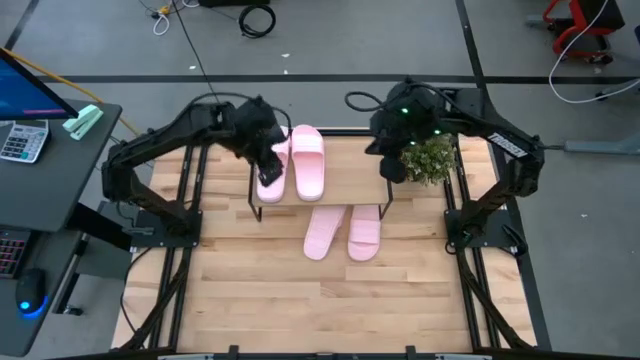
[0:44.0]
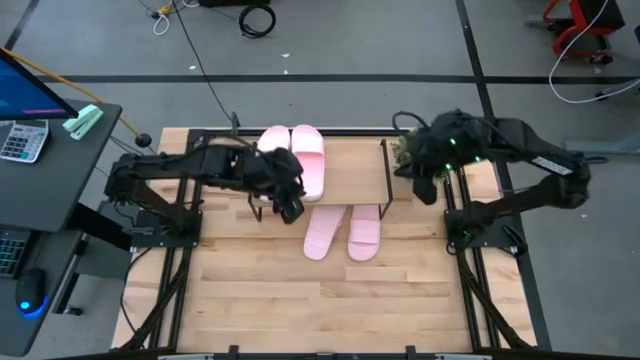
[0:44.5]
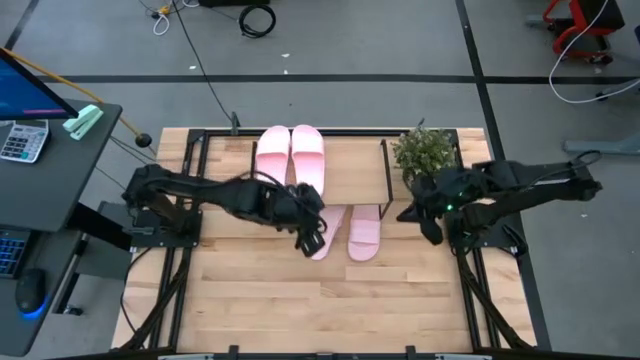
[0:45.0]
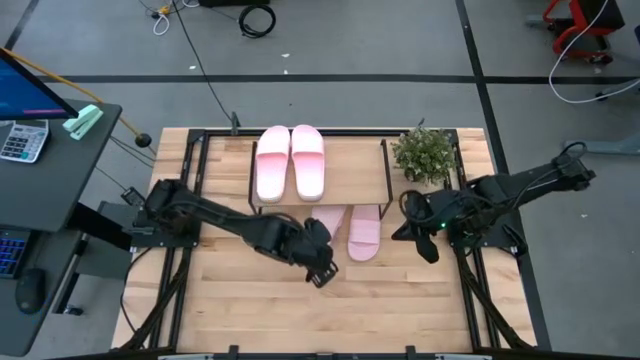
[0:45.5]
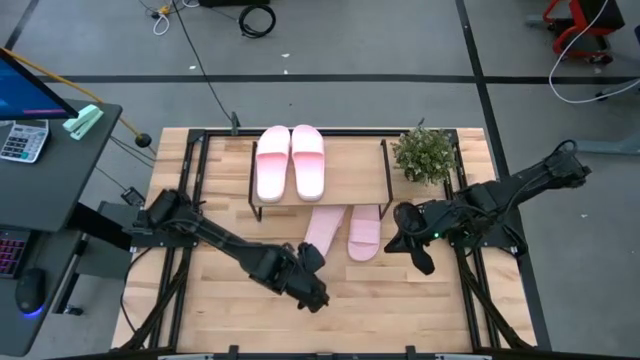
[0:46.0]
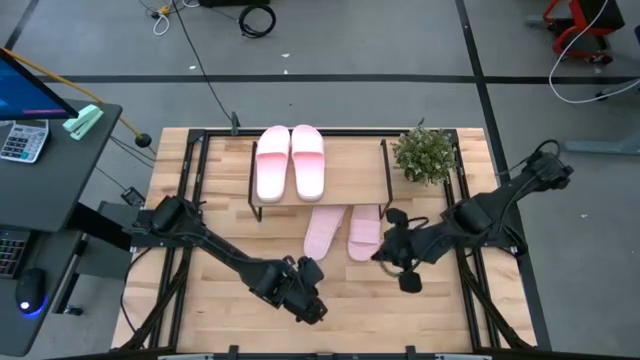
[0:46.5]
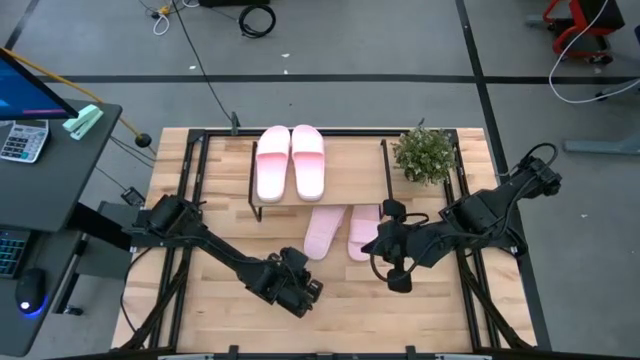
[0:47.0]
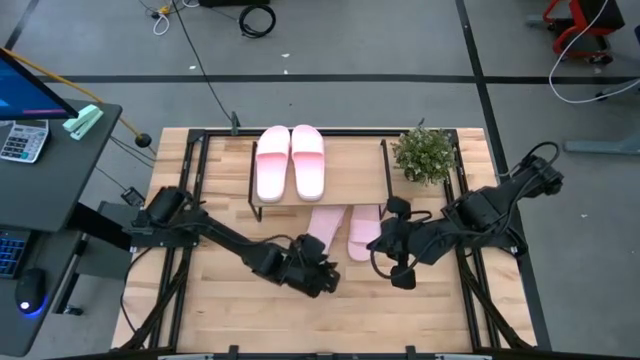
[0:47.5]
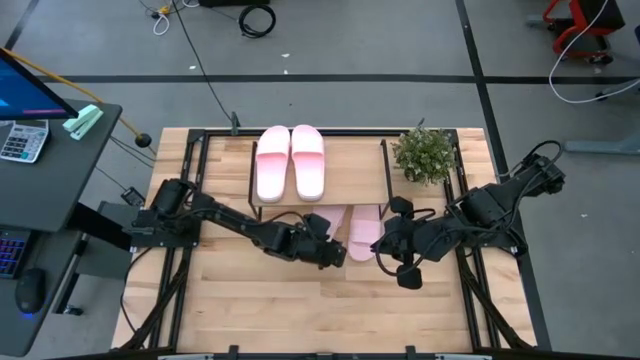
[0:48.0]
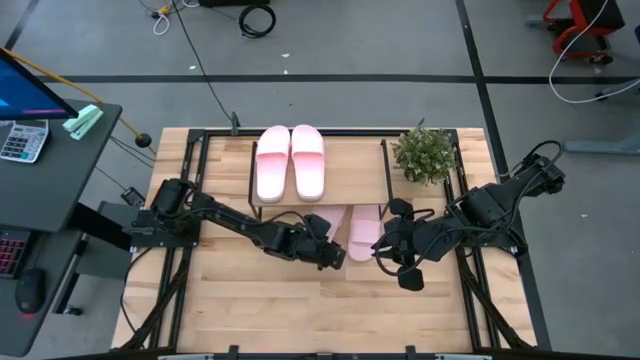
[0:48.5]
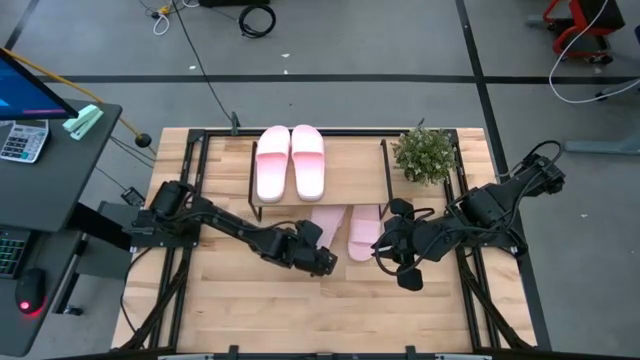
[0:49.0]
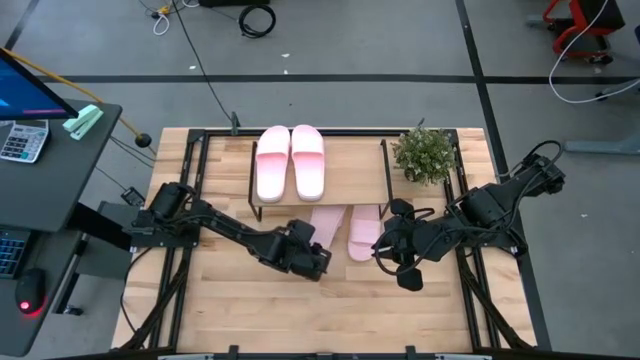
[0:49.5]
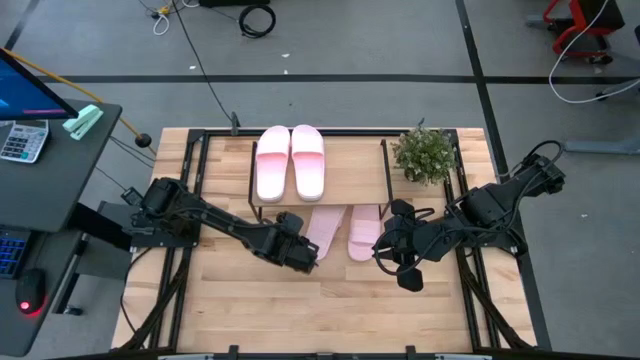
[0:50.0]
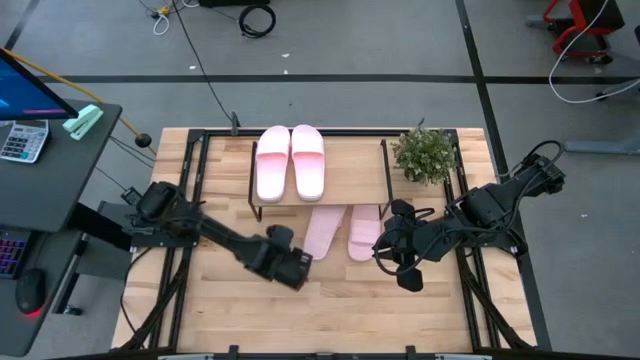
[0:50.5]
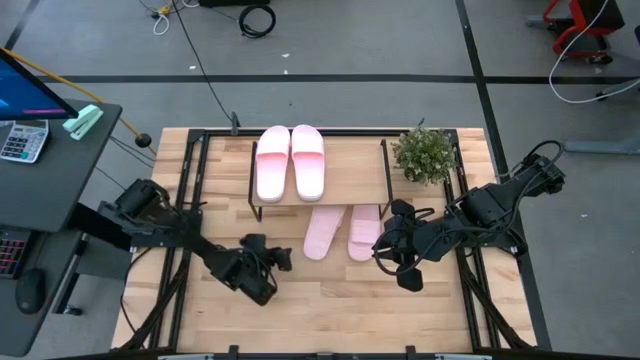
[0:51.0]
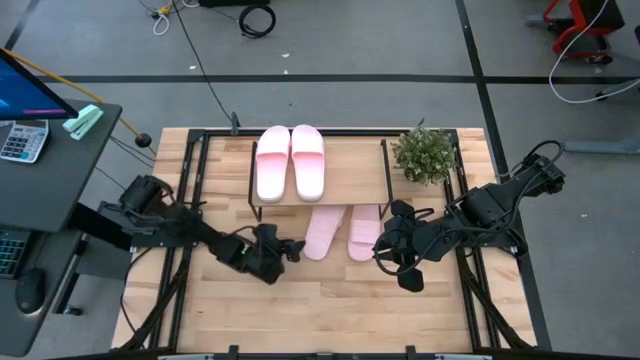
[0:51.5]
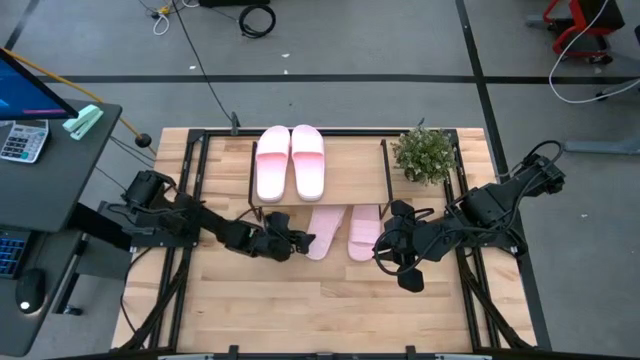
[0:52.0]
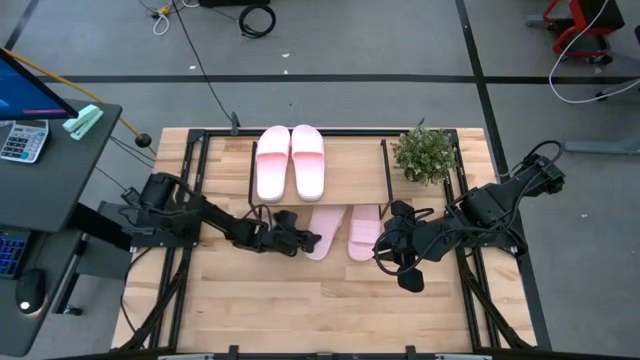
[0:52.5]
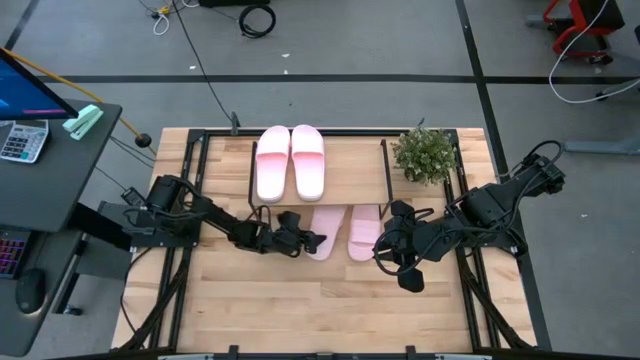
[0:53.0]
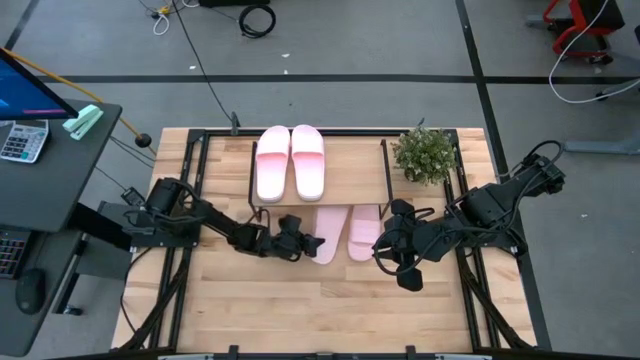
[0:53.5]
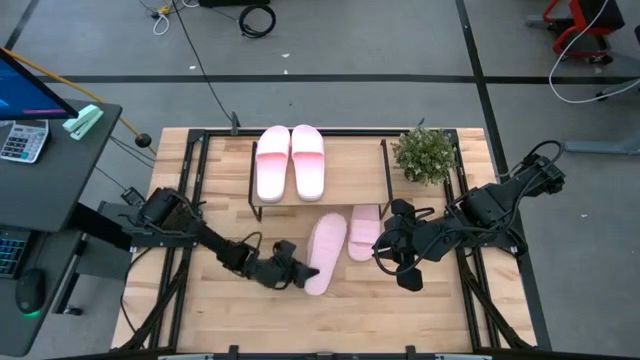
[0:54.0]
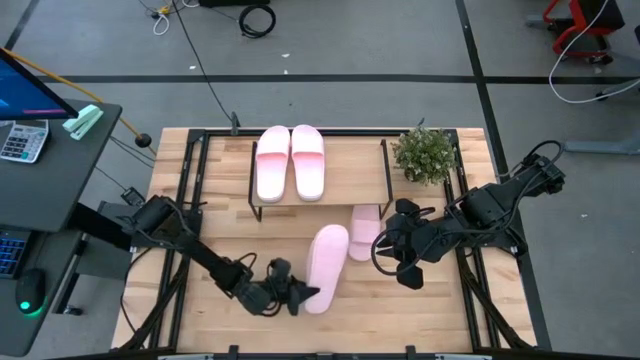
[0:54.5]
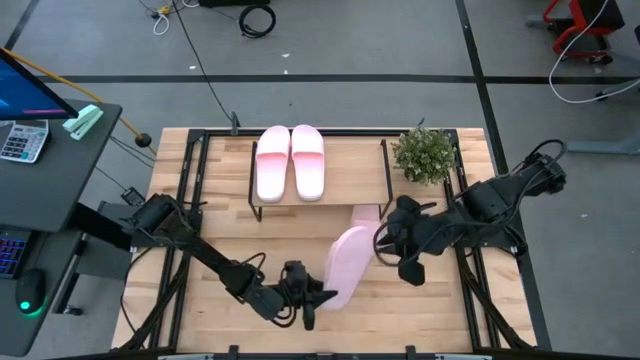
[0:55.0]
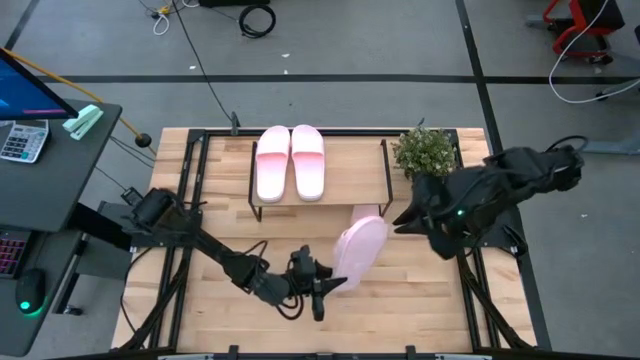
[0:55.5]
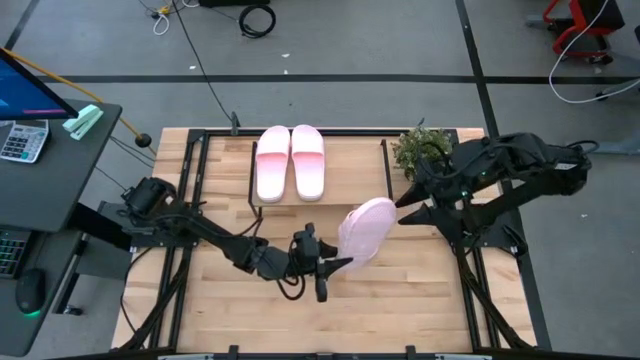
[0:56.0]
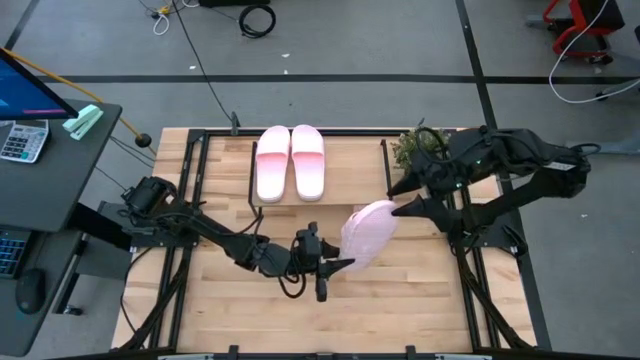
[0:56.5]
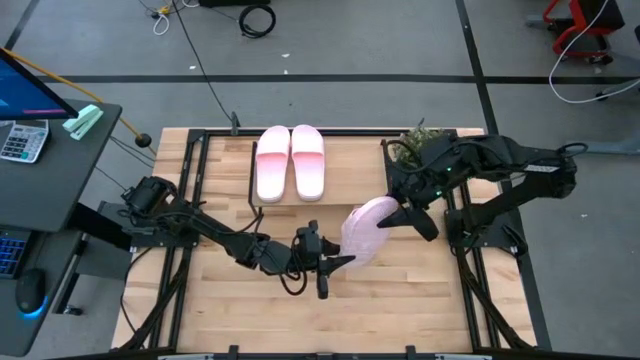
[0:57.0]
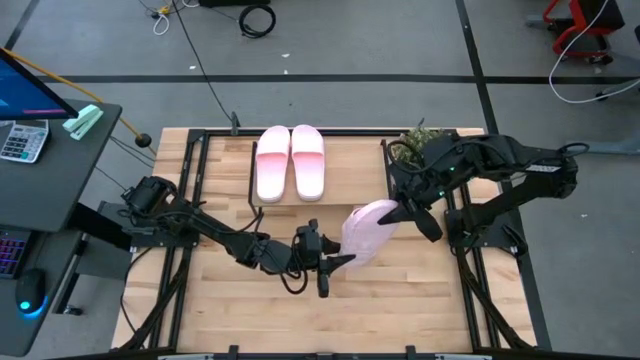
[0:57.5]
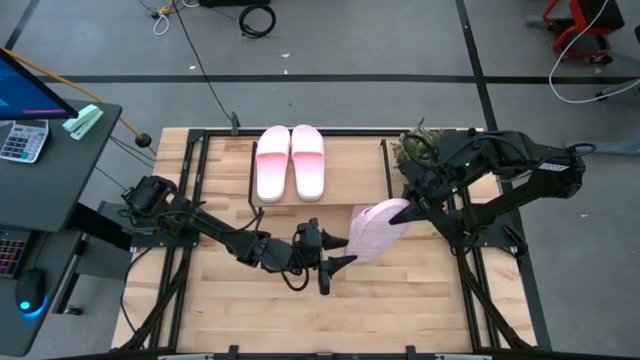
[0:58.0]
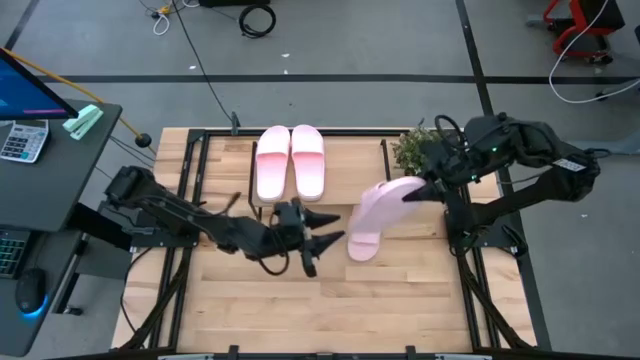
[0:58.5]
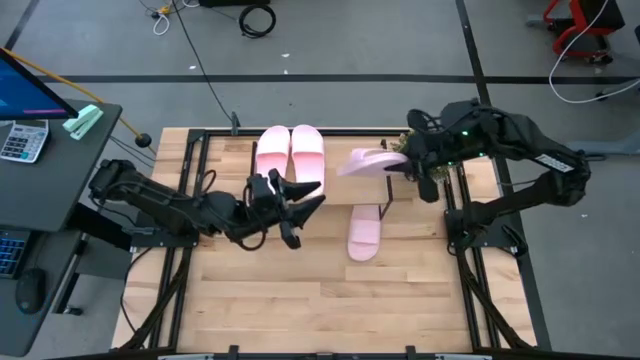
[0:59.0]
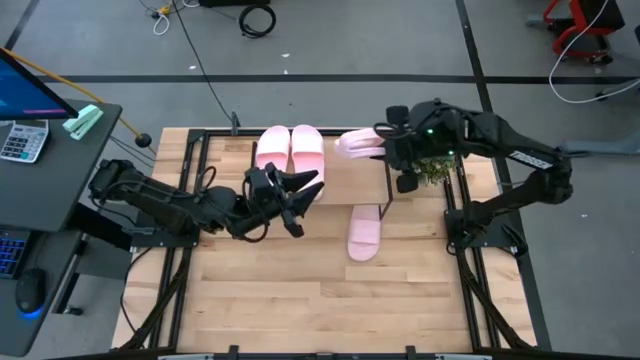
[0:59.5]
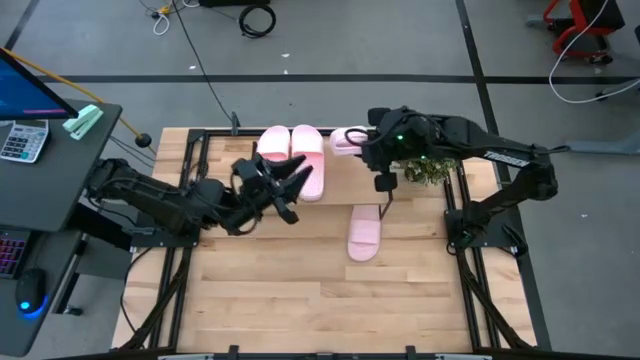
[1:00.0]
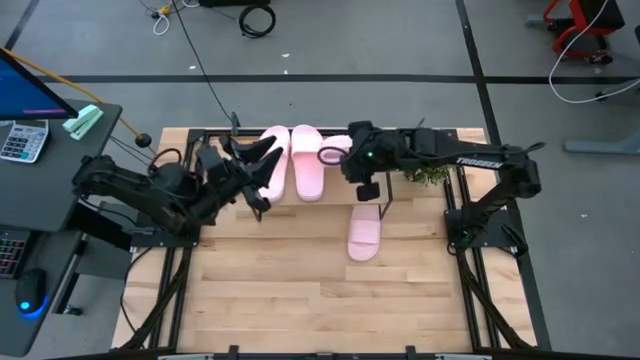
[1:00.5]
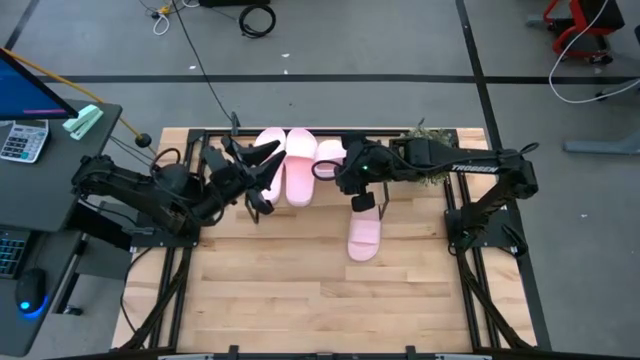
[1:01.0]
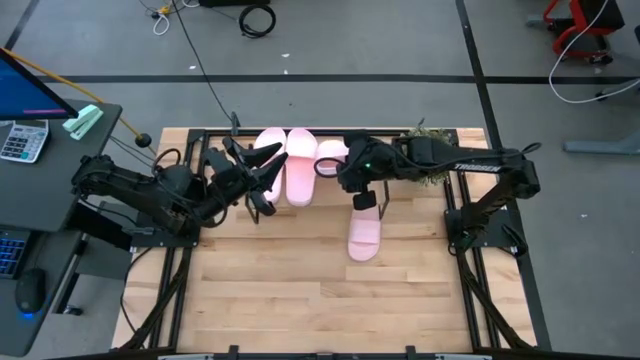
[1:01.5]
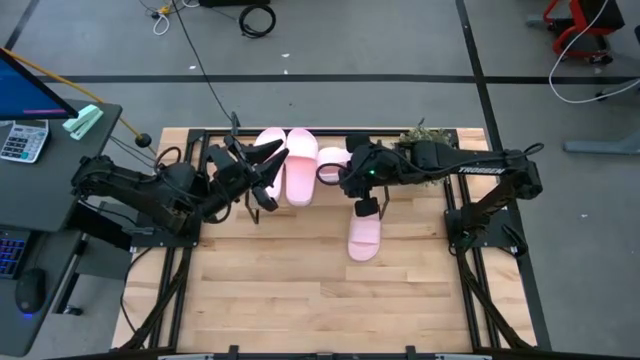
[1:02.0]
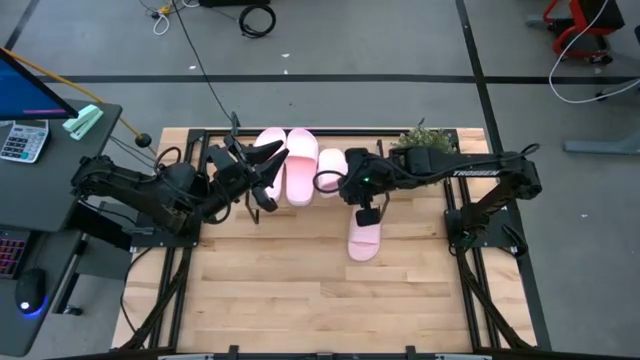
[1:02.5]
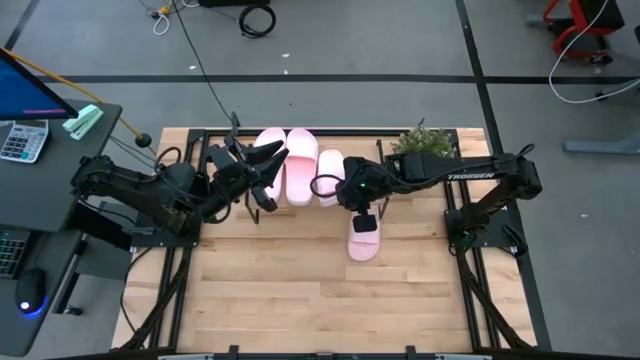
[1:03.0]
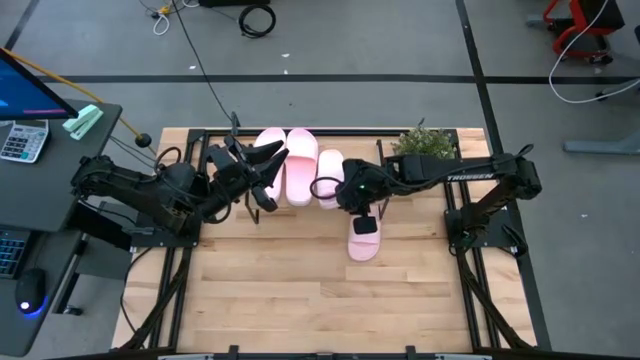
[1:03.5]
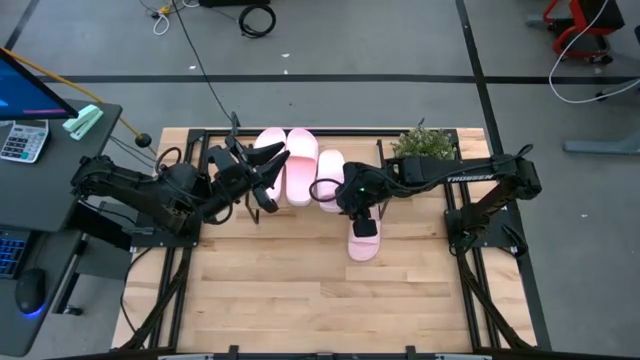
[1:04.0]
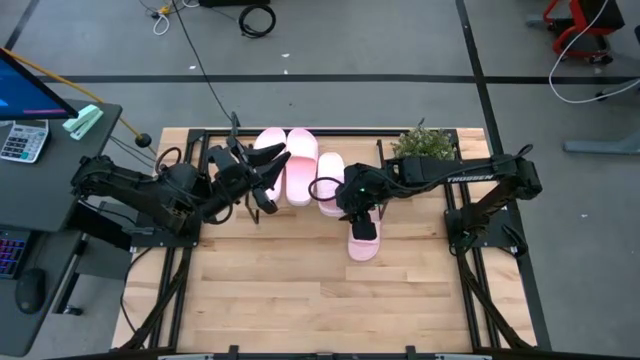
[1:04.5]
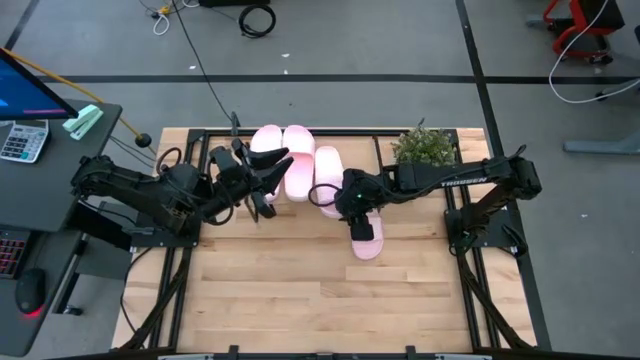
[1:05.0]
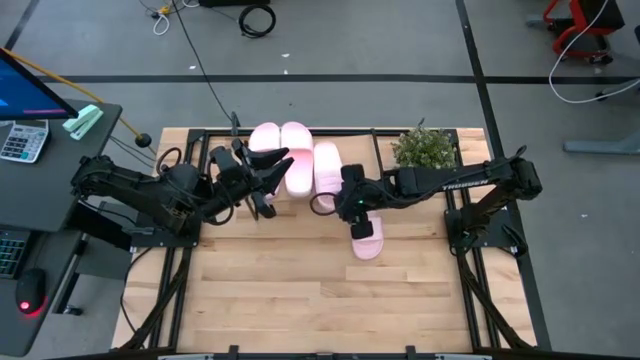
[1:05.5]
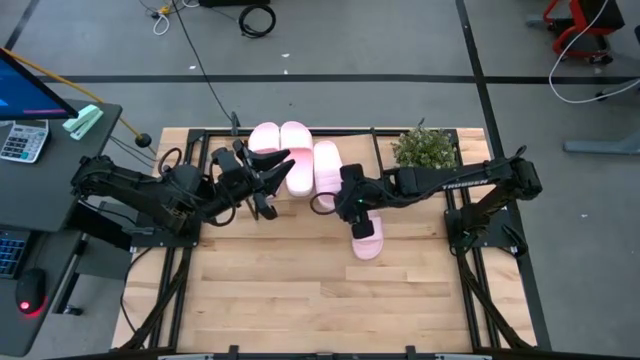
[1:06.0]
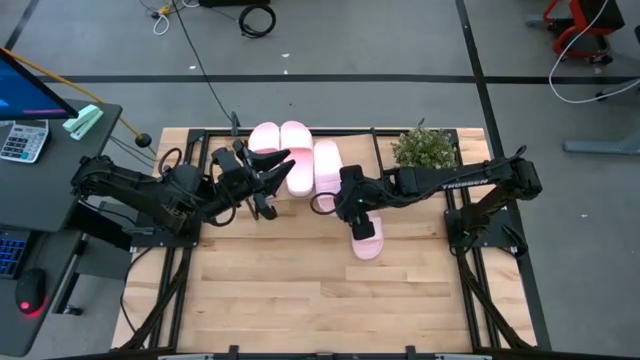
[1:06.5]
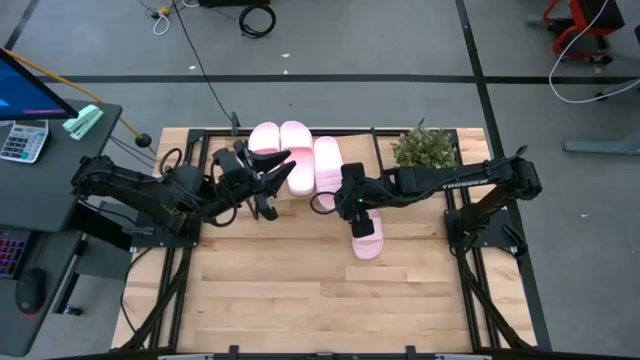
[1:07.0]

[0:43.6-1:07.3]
Task: Pick and place slides into the shelf
Put the pink slipper on the shelf
